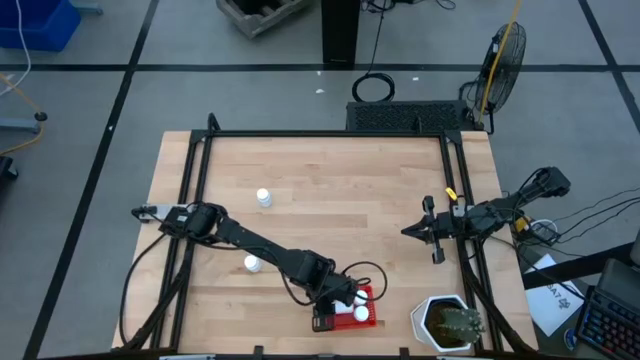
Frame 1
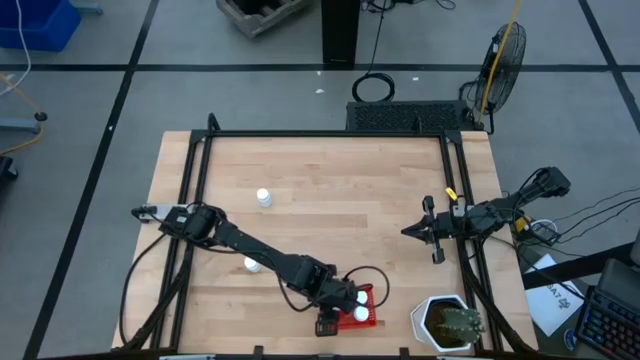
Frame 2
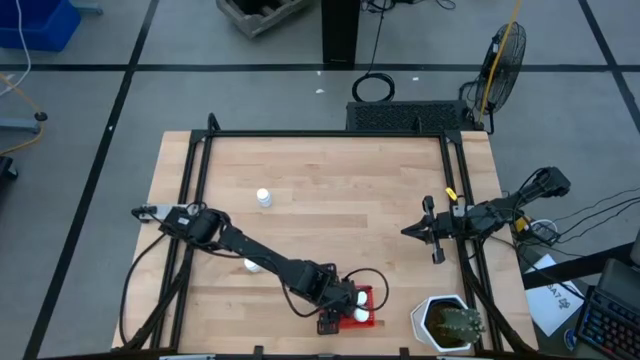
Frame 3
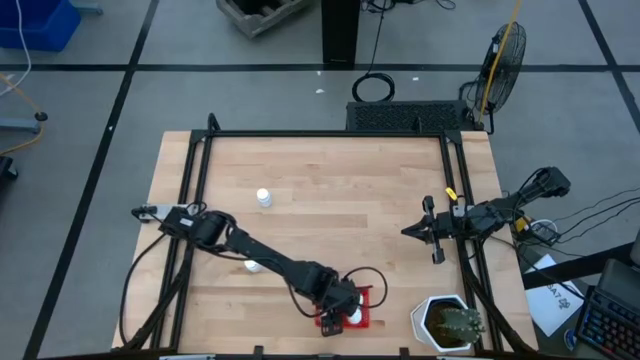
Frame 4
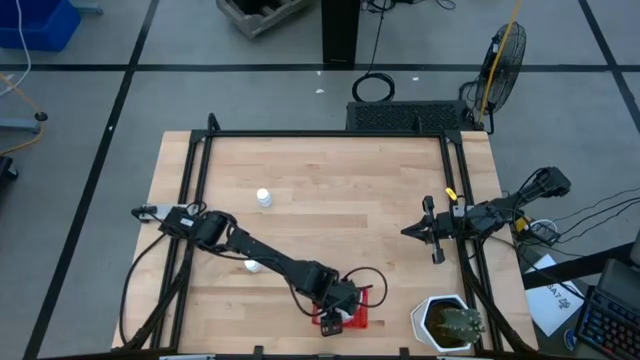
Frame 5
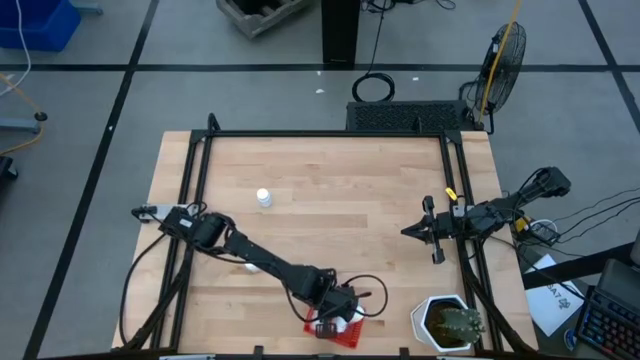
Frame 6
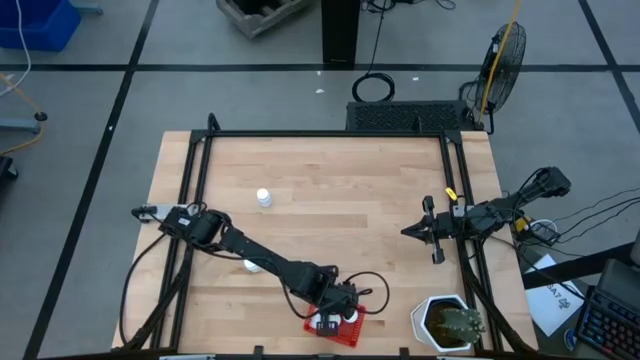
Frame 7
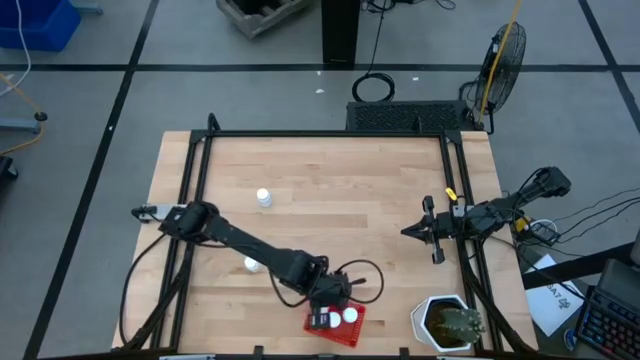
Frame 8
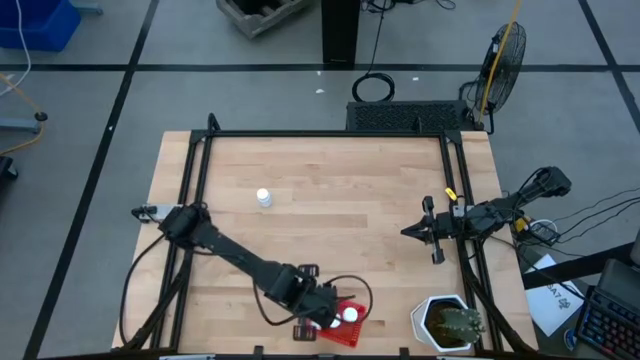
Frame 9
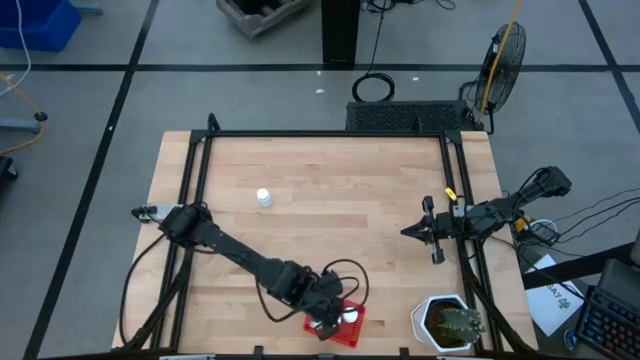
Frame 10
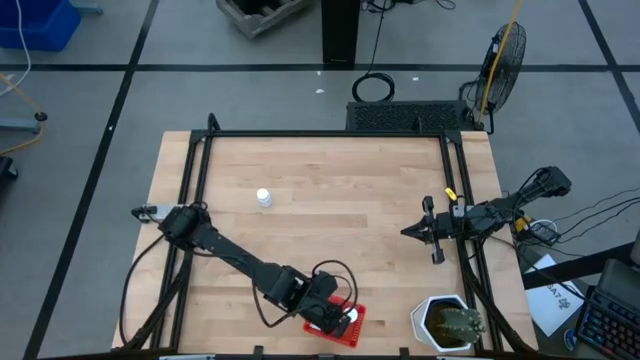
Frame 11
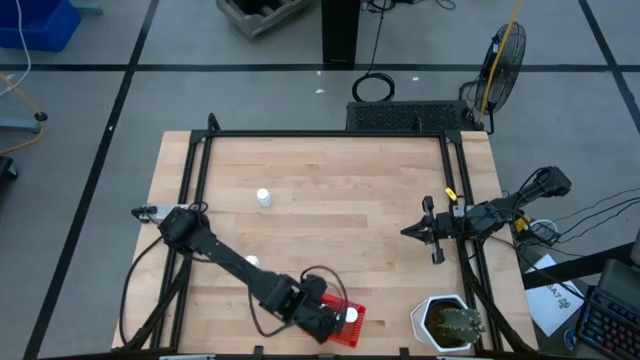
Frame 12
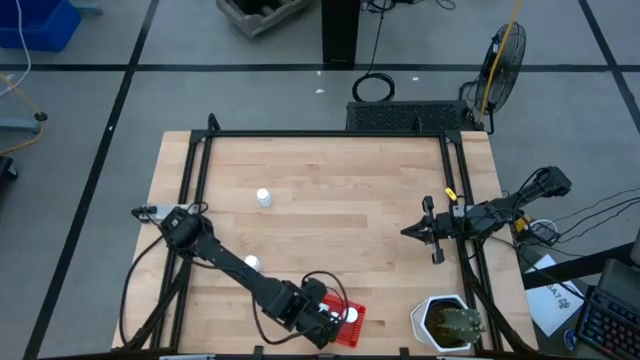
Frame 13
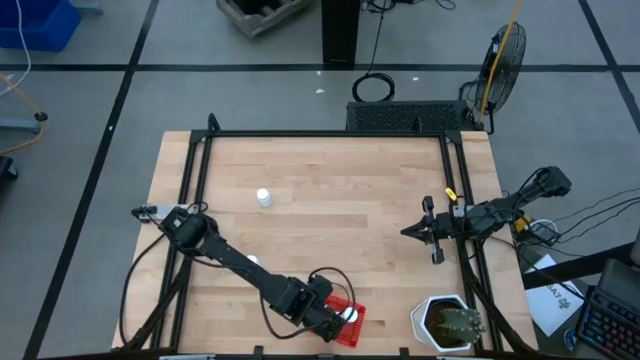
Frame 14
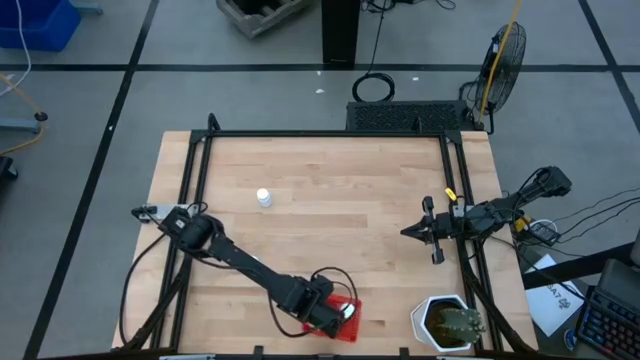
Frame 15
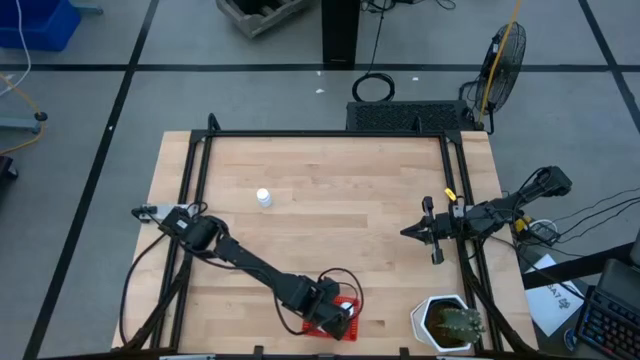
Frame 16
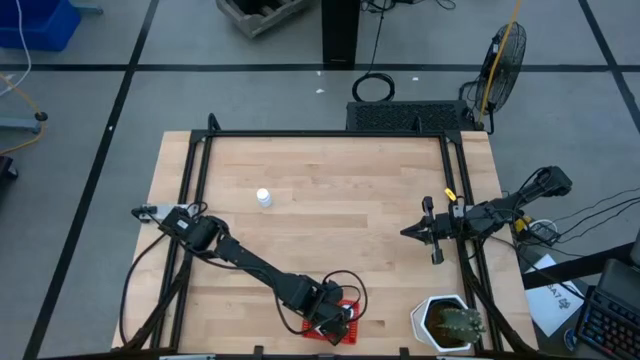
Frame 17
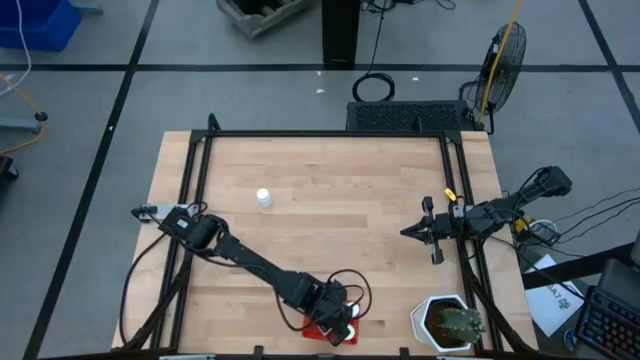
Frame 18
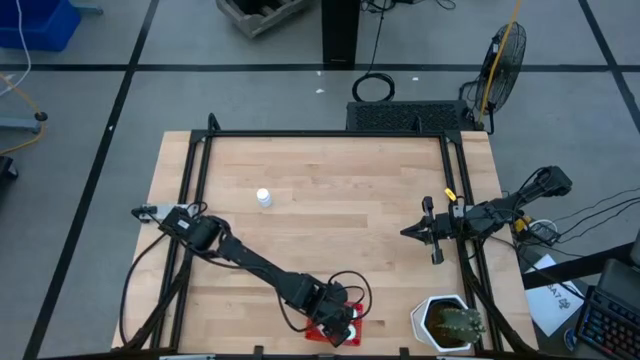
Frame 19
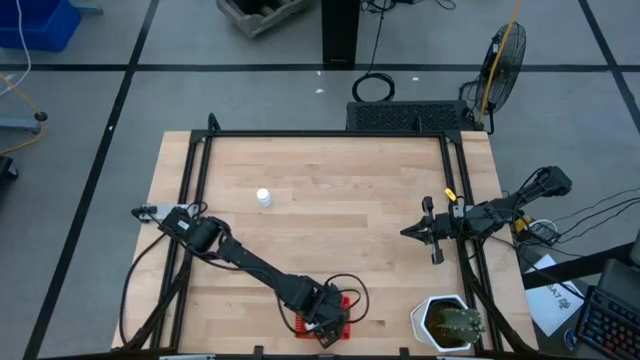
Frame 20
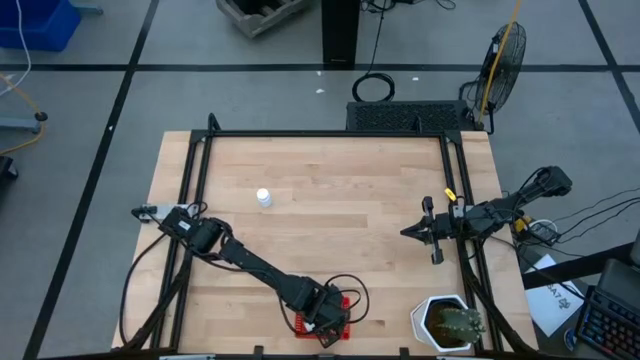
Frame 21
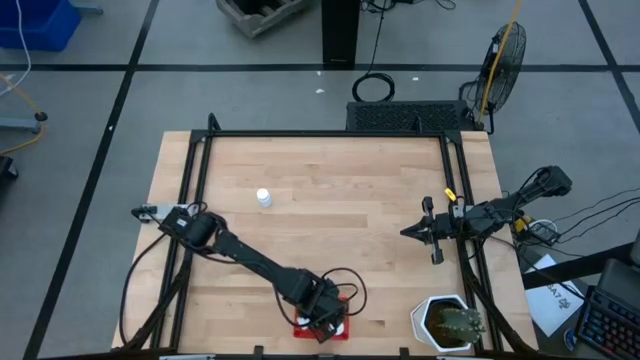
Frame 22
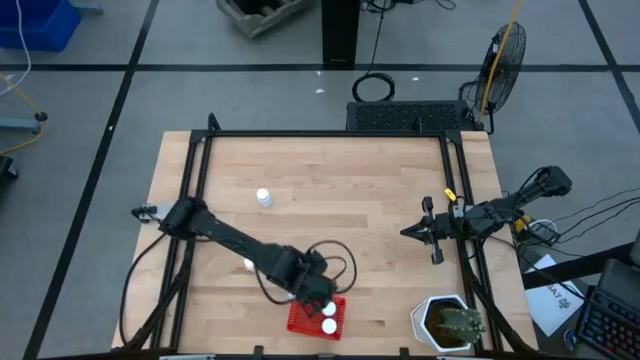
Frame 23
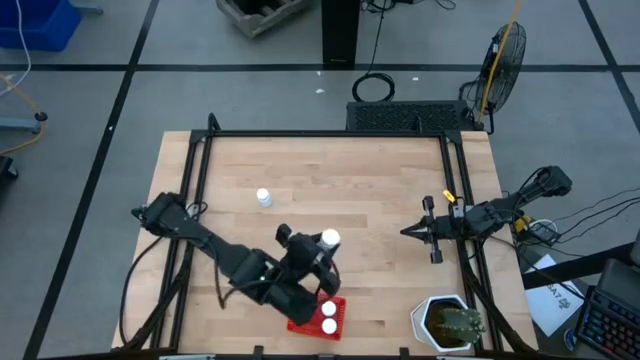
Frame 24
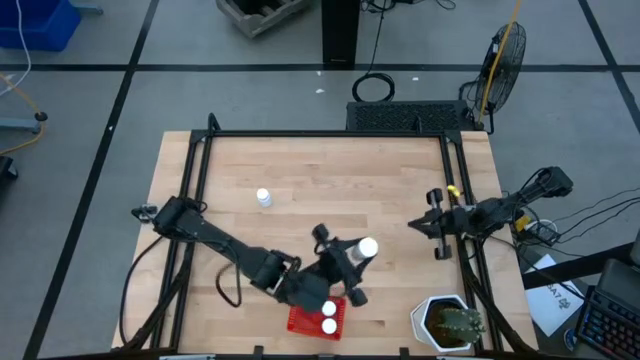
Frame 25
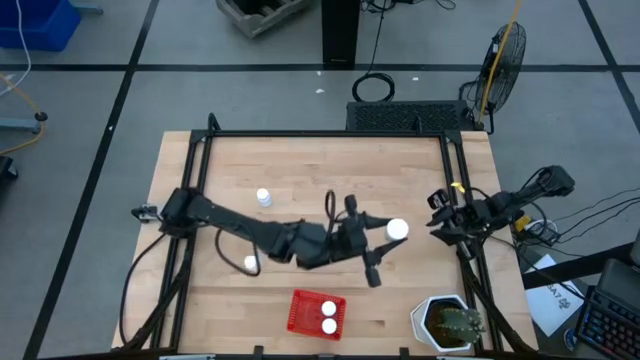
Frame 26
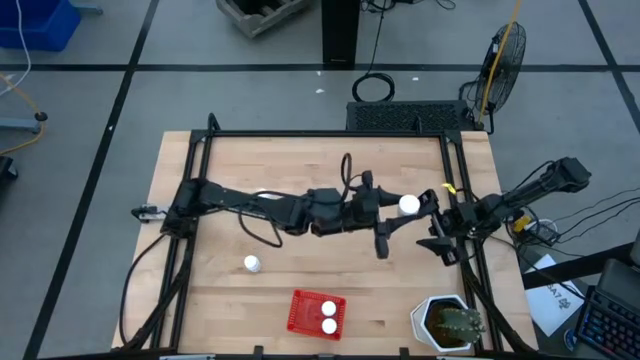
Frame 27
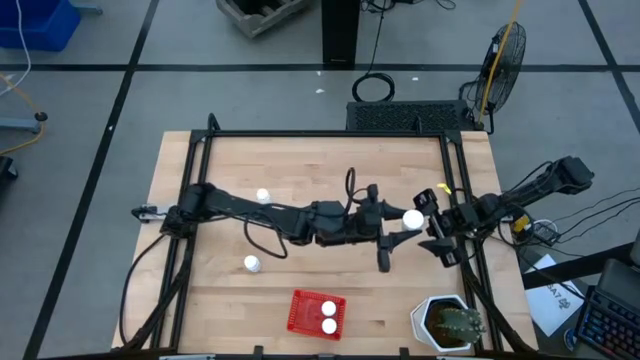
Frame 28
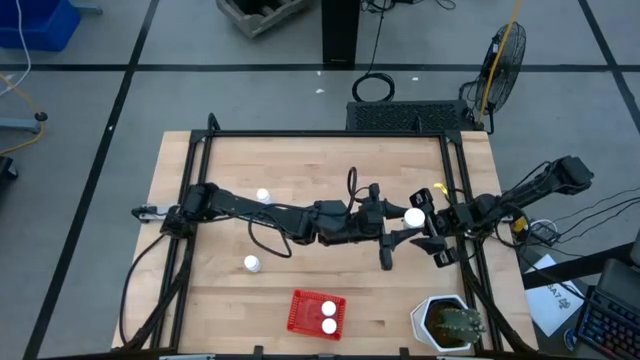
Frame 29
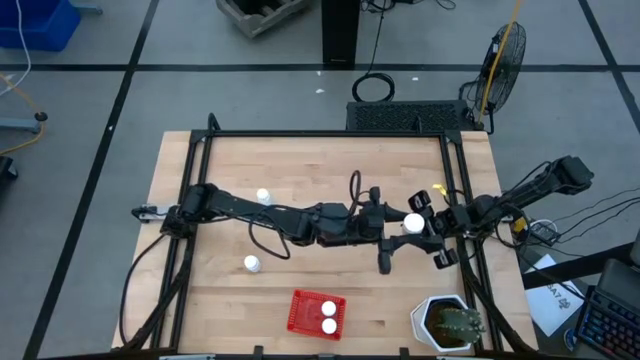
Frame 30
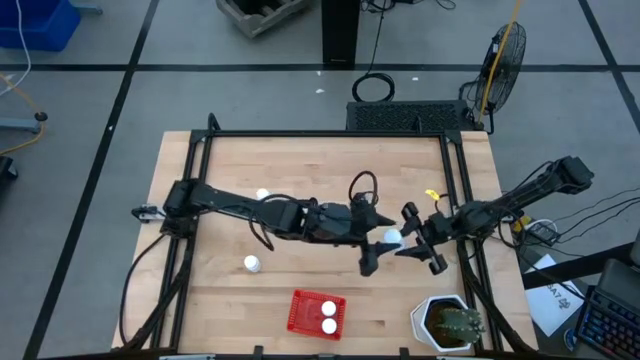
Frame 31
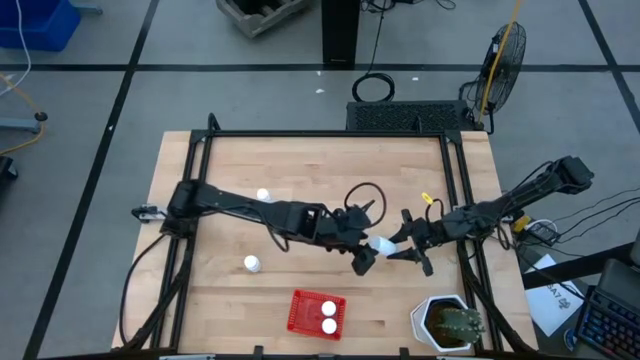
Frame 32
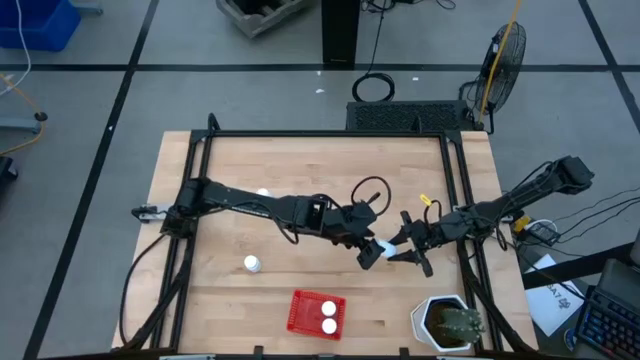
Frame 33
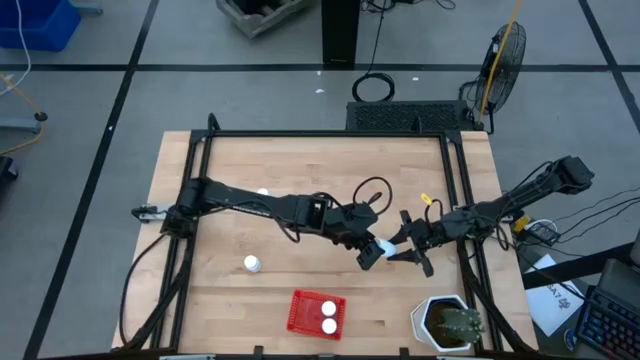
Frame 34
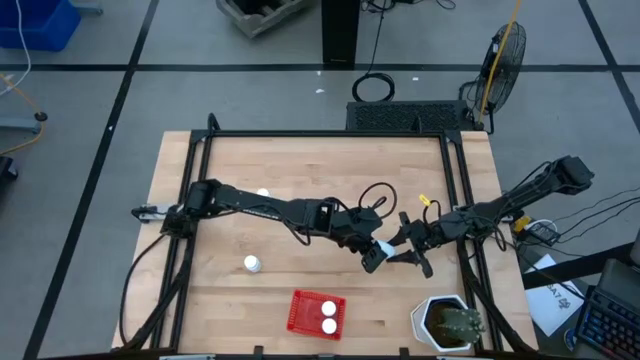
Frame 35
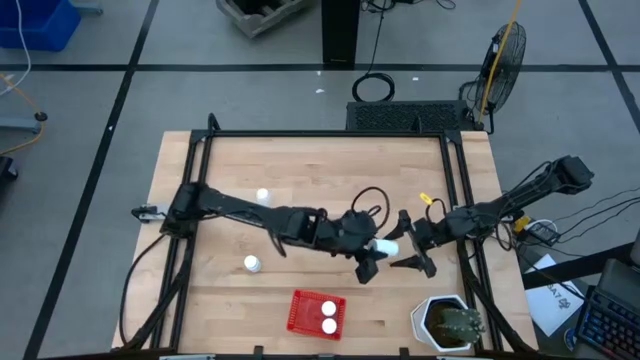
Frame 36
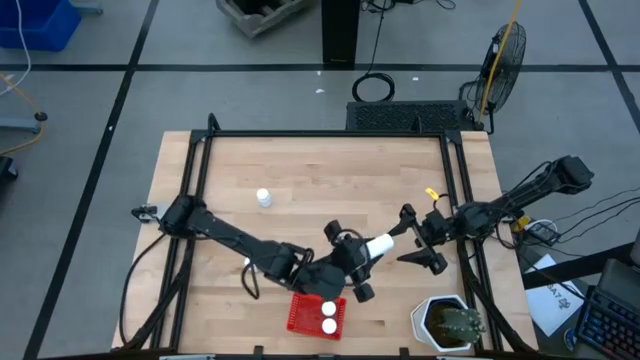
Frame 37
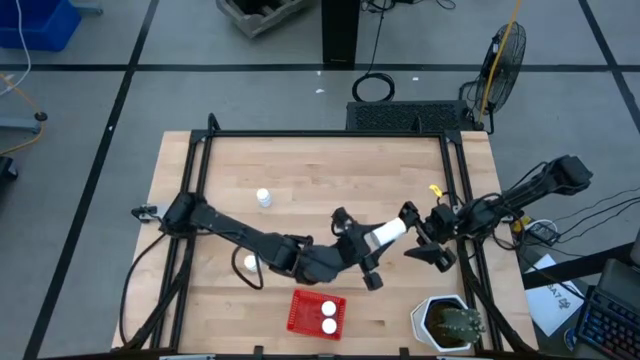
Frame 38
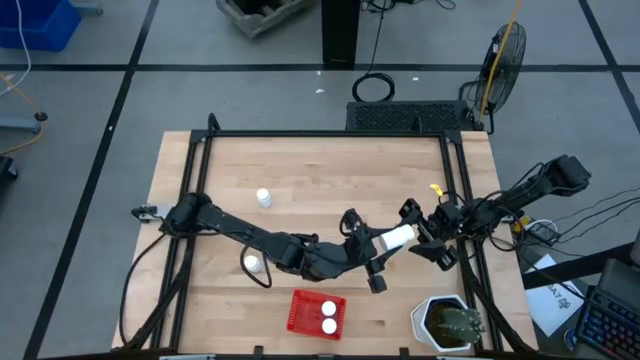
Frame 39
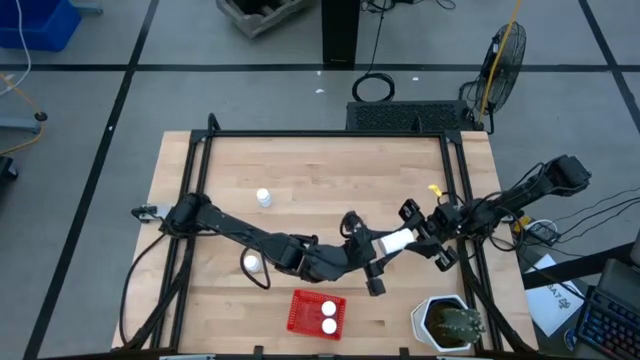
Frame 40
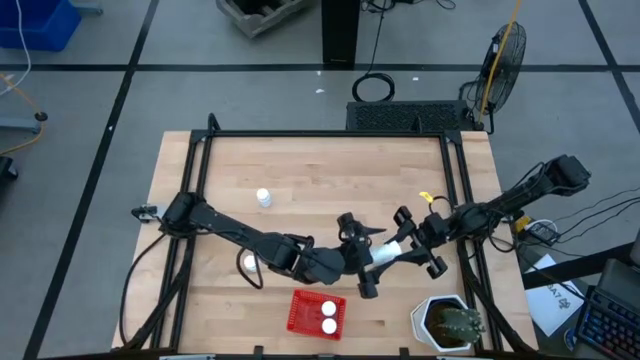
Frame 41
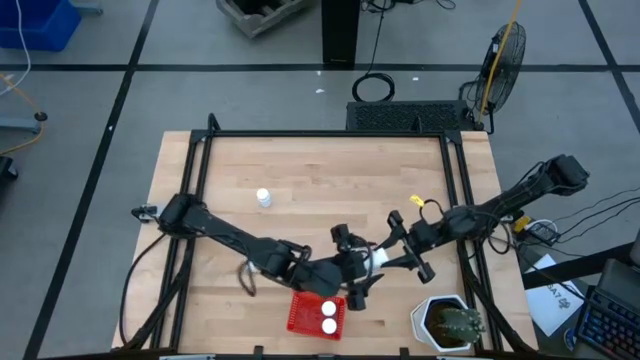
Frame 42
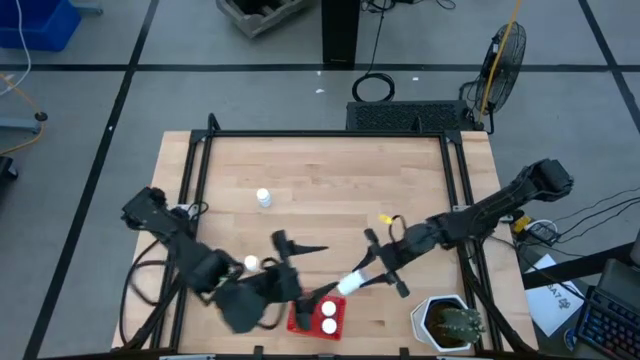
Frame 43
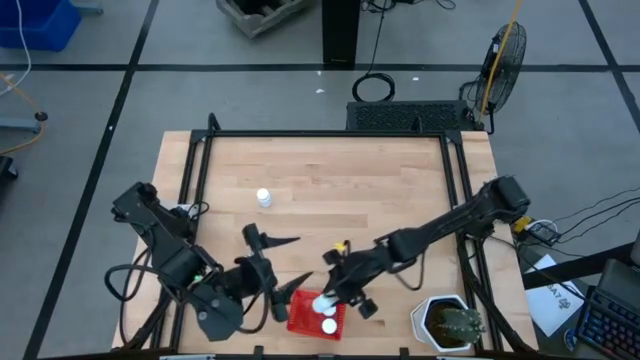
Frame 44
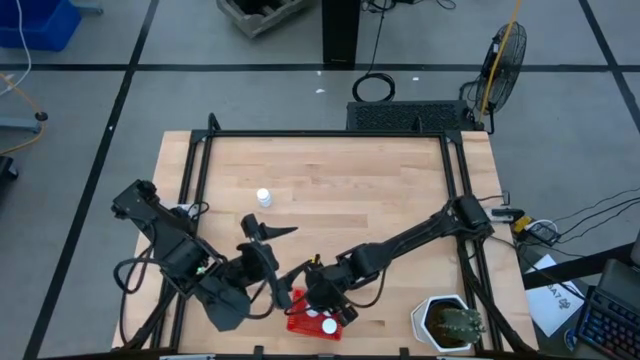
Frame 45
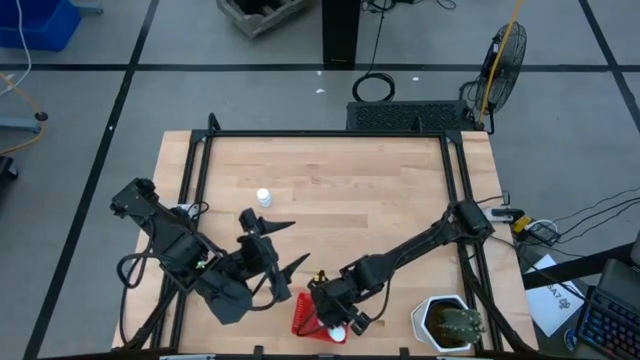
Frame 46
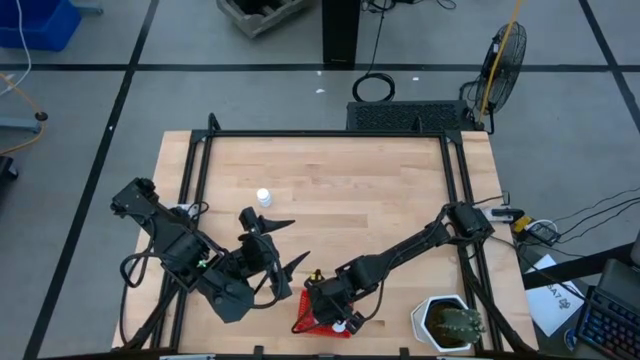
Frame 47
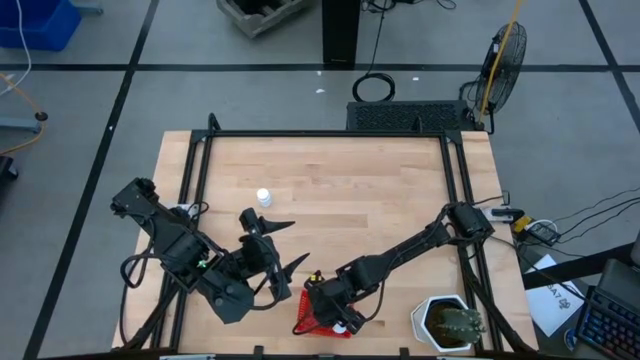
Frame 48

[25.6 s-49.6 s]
Task: Pick and place pill bottles into a basket
Put the white pill bottle into the red basket
